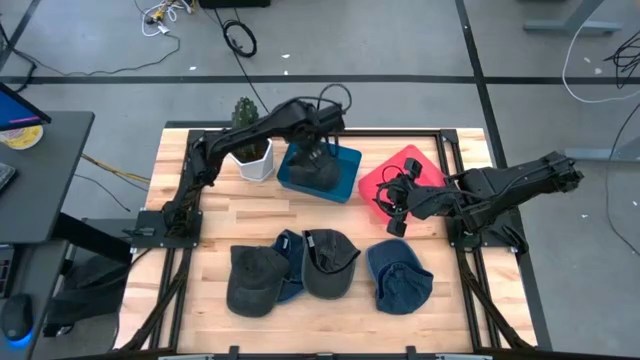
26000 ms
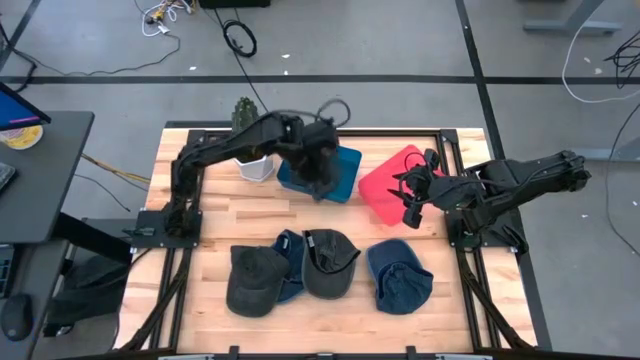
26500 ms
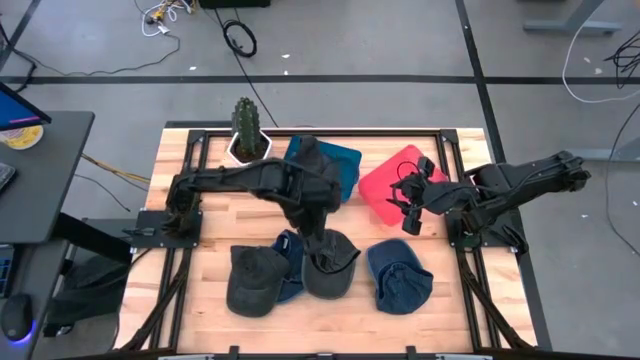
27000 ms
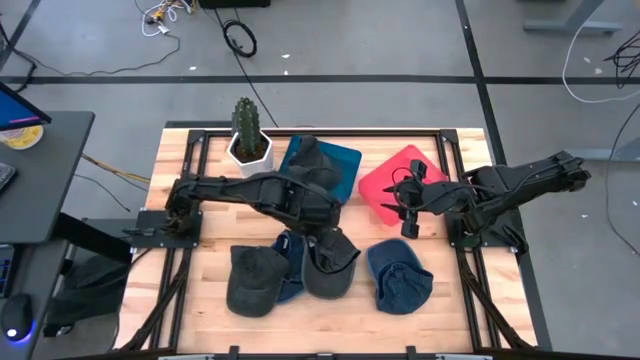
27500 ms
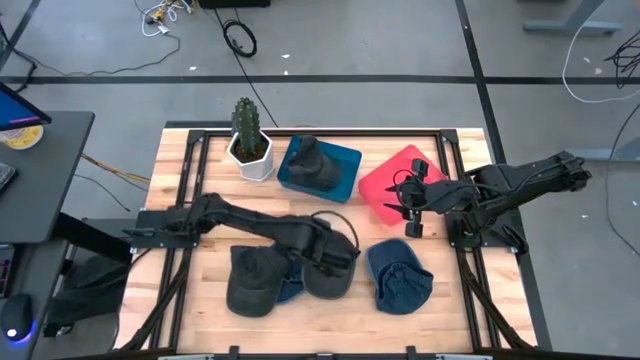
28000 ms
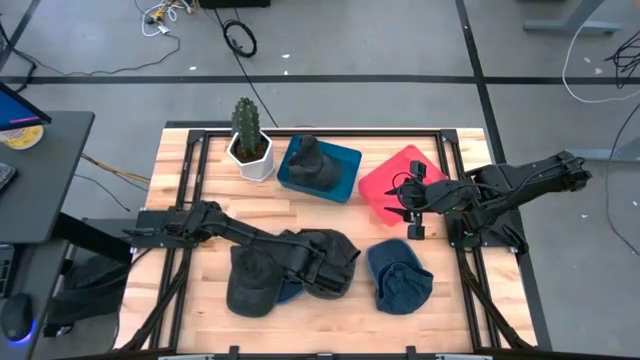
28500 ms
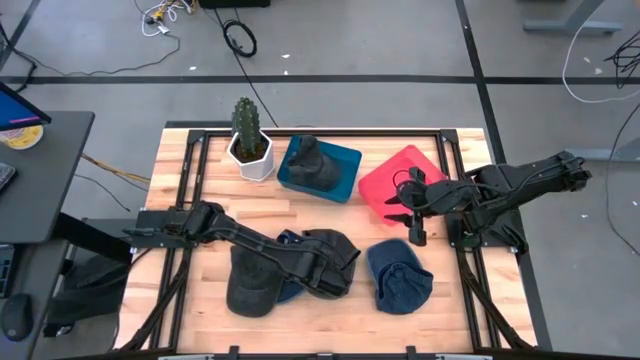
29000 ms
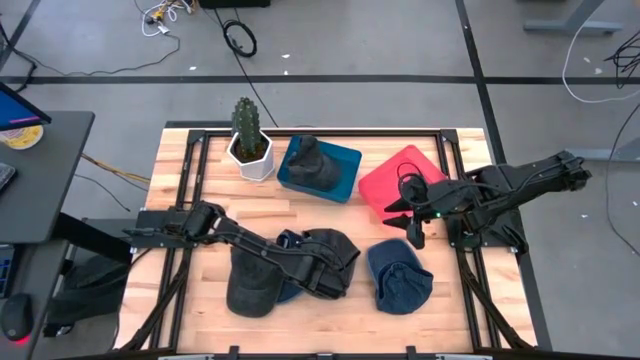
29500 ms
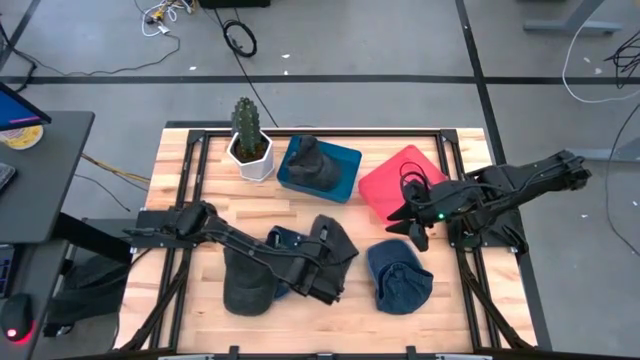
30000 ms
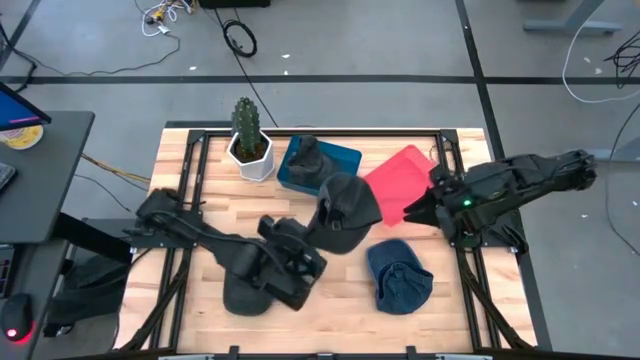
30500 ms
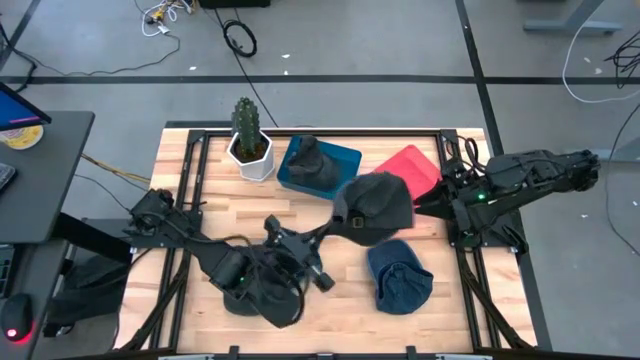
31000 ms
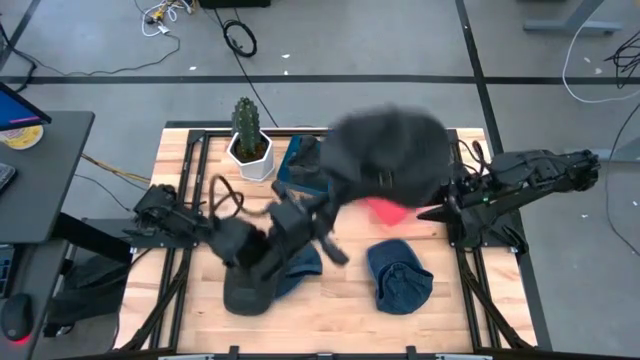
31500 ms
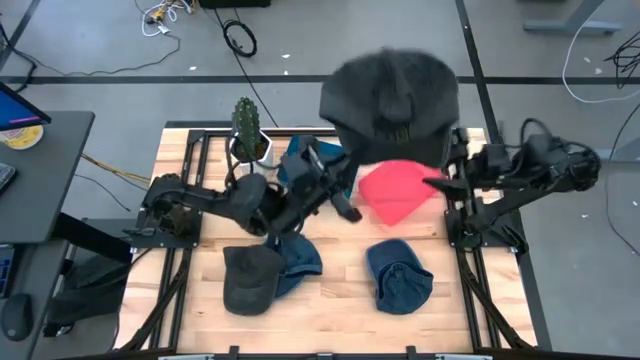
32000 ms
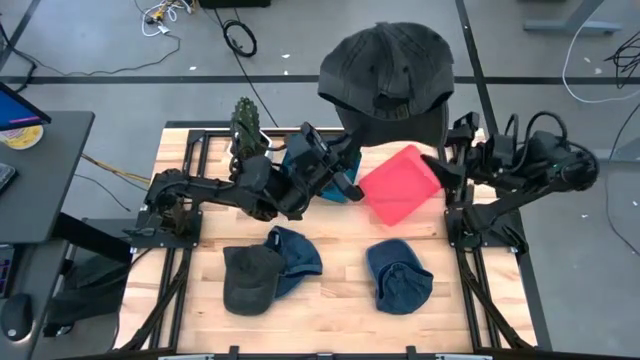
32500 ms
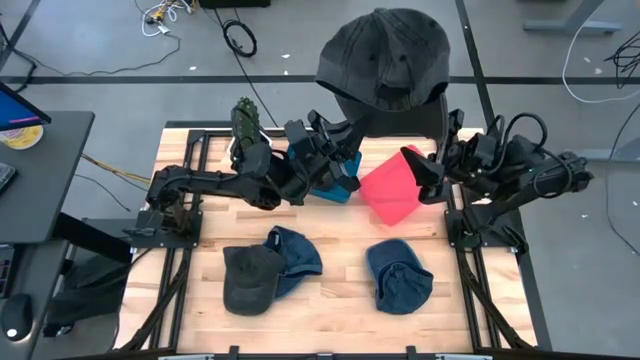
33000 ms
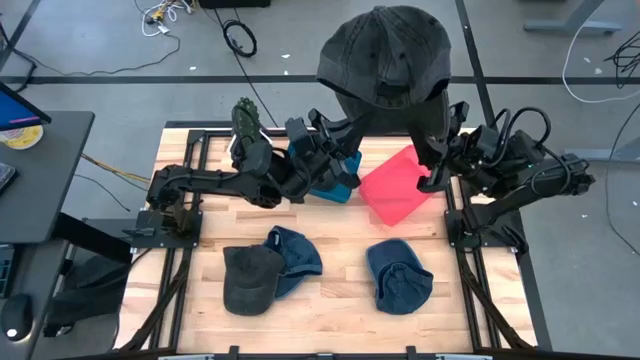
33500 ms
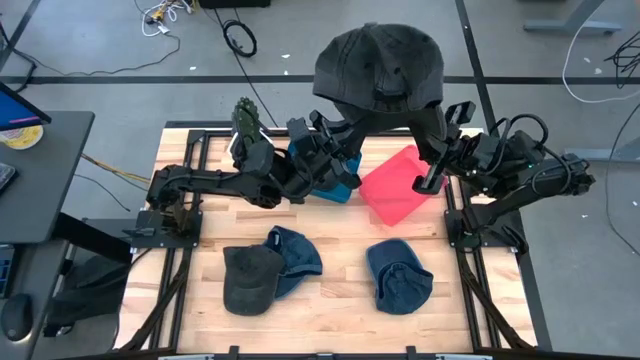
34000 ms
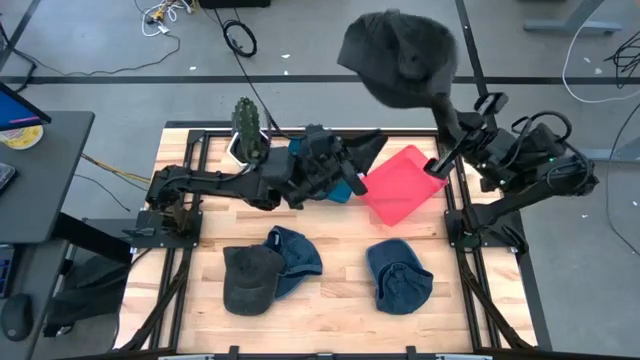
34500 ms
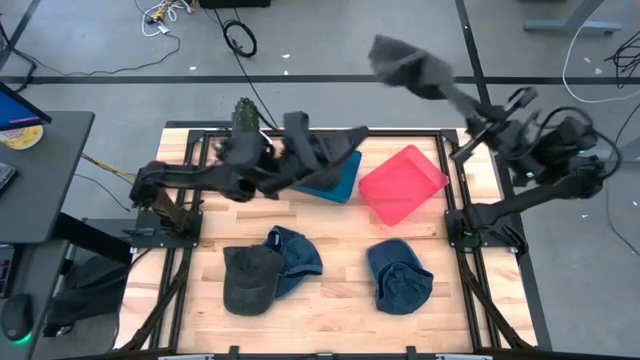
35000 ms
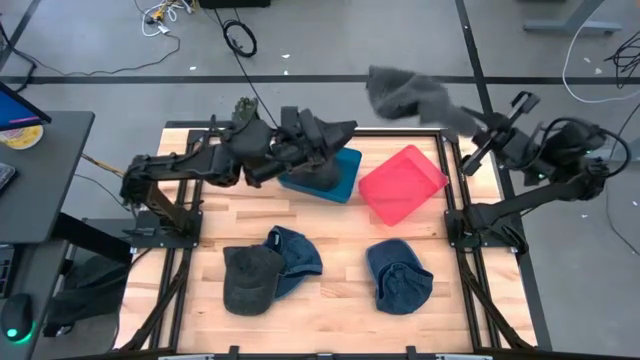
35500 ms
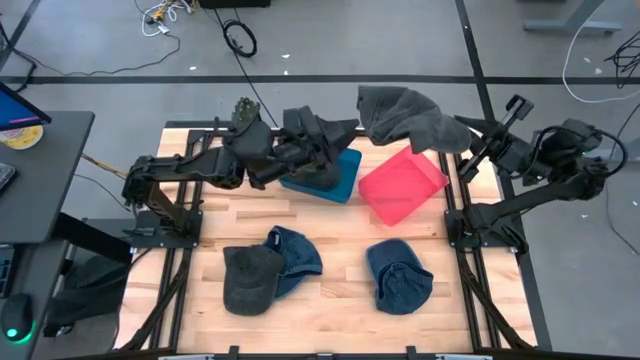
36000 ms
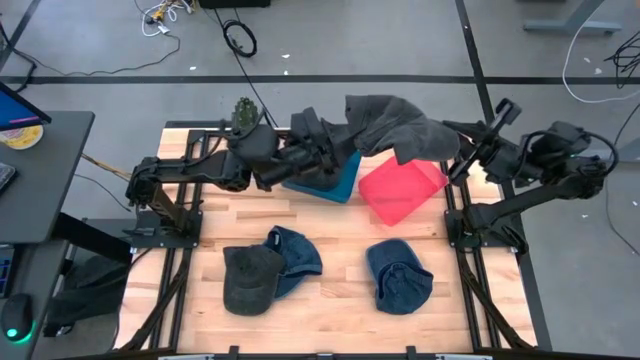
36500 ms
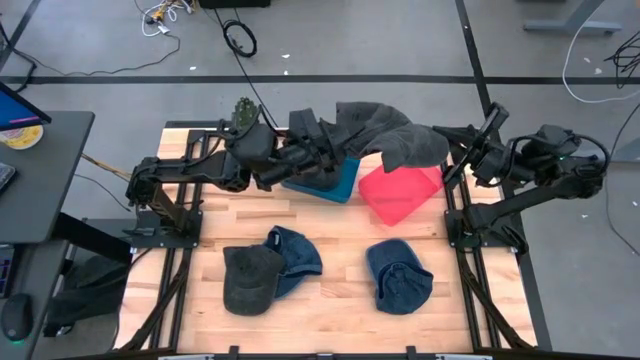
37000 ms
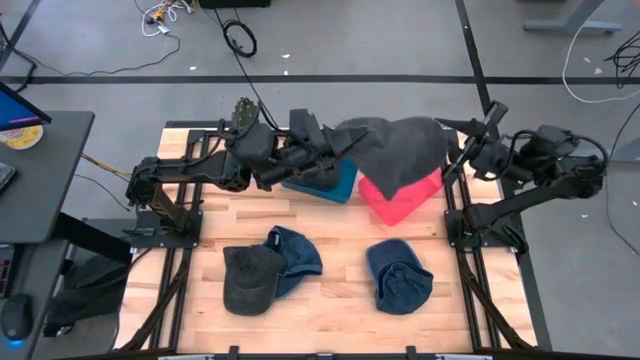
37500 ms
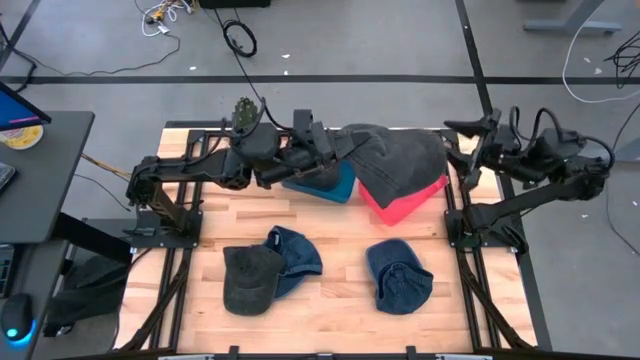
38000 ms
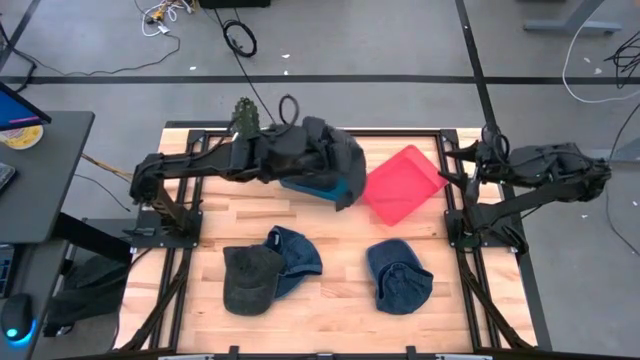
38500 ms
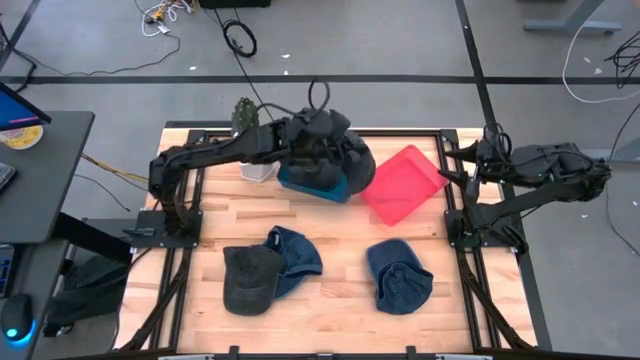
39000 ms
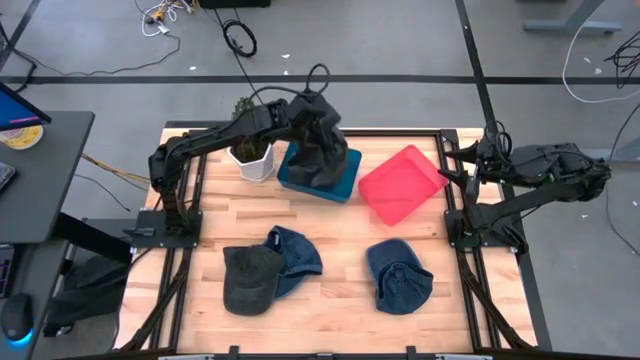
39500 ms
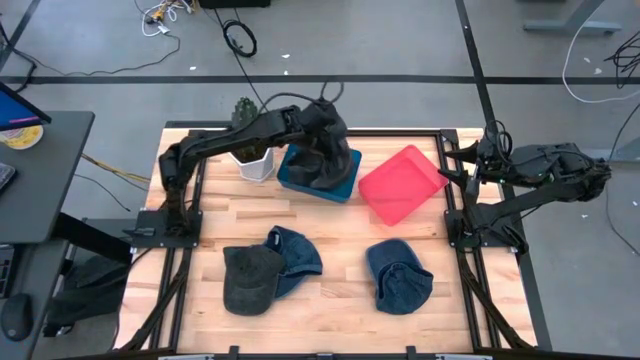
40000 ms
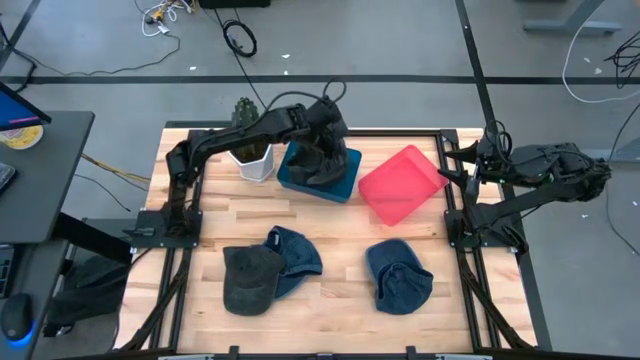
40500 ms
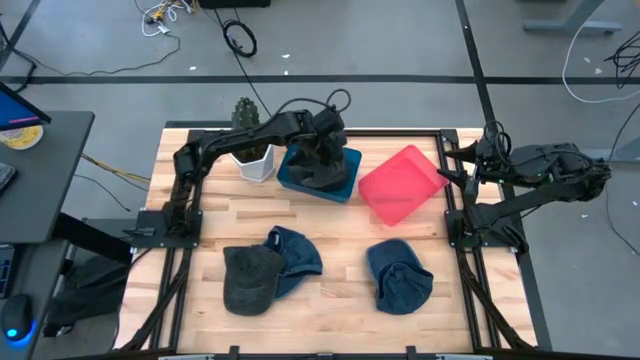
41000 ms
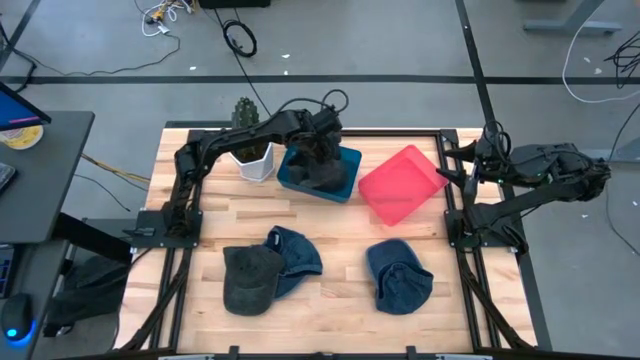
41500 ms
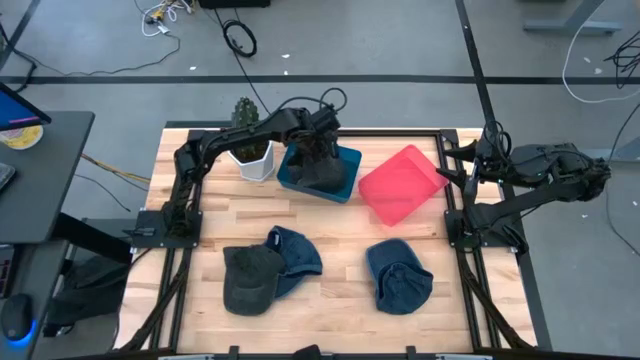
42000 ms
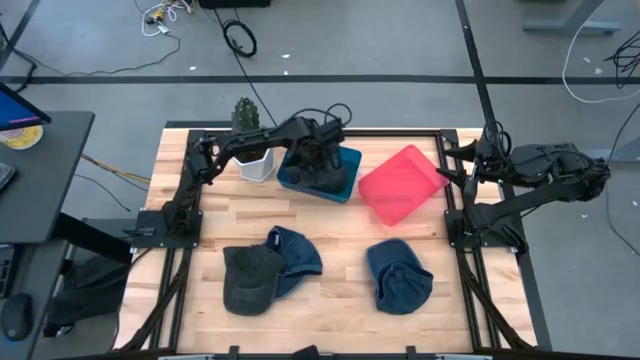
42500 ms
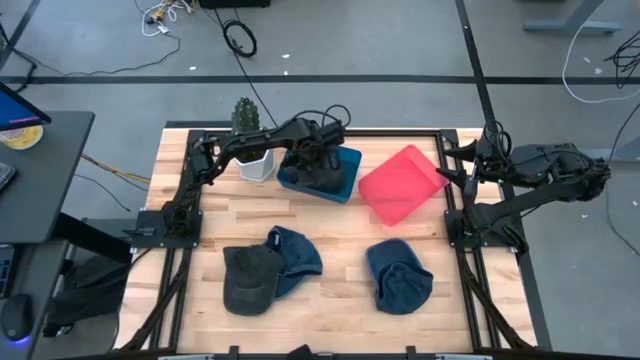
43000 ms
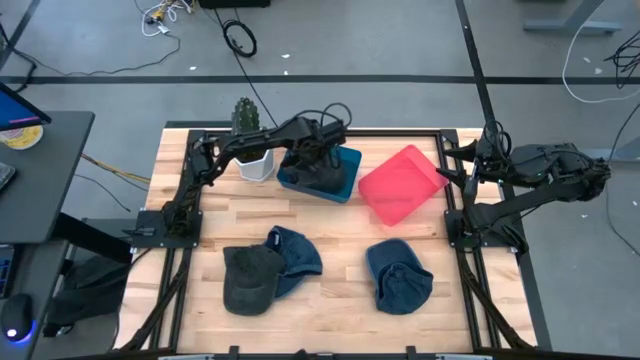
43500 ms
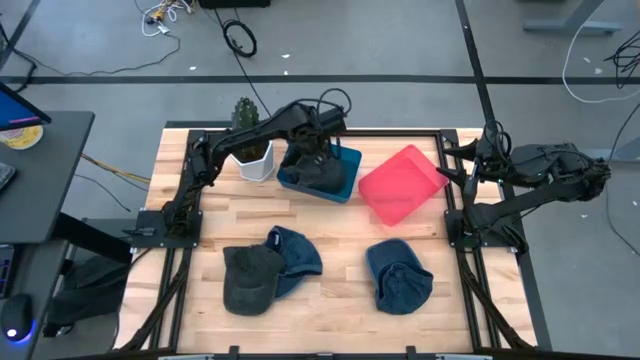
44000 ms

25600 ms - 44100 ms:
Task: Pick & Place hat
Put the right black cap into the blue bin
